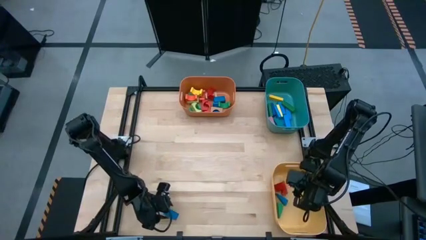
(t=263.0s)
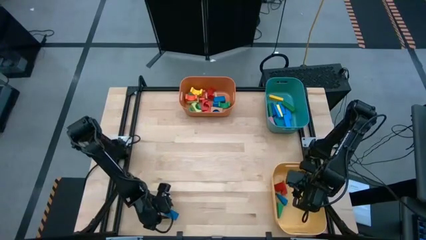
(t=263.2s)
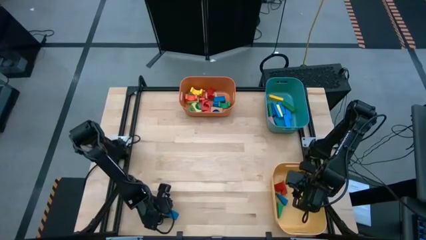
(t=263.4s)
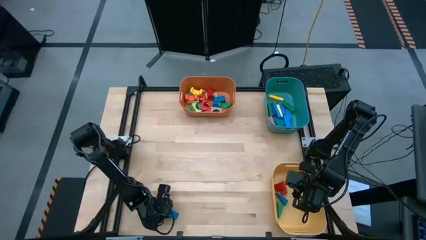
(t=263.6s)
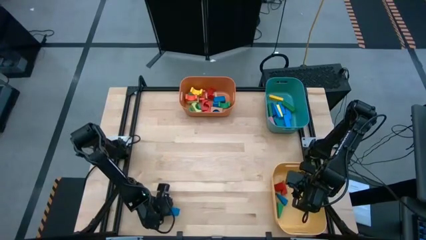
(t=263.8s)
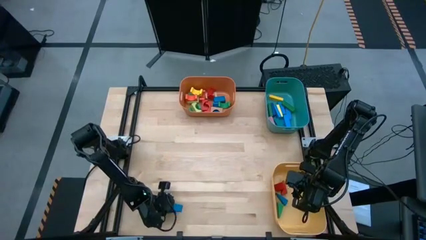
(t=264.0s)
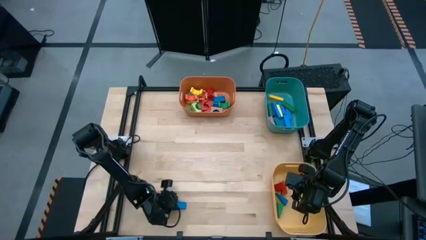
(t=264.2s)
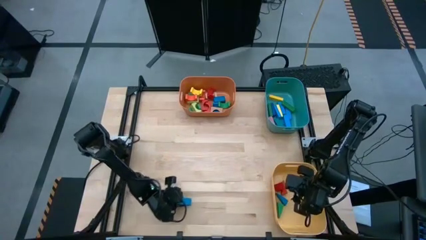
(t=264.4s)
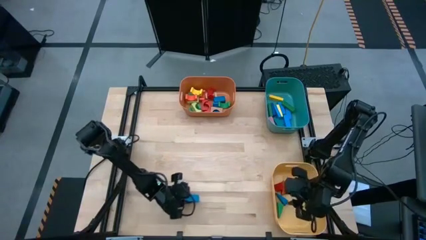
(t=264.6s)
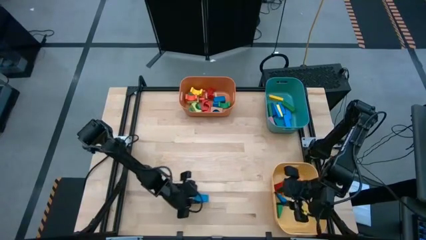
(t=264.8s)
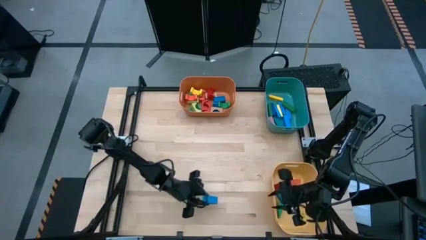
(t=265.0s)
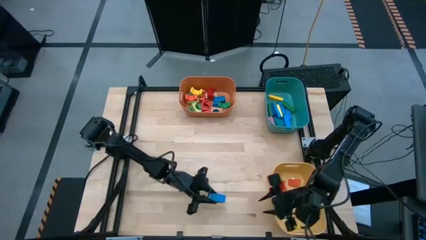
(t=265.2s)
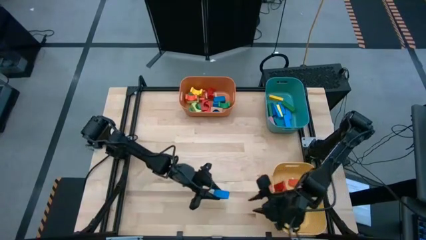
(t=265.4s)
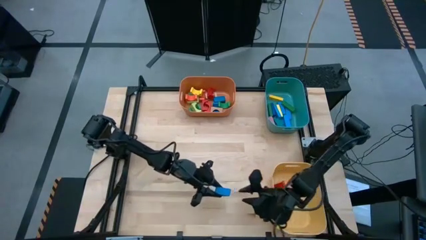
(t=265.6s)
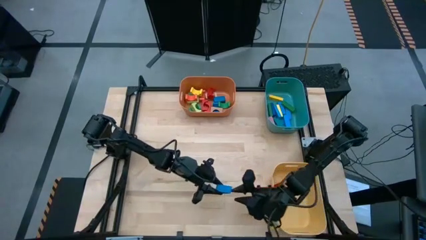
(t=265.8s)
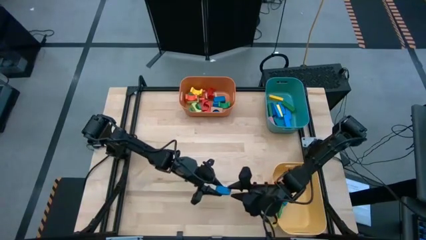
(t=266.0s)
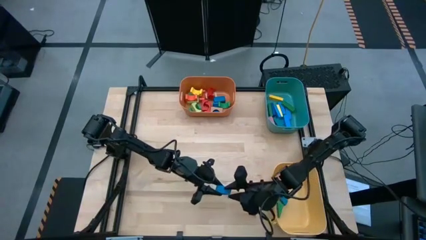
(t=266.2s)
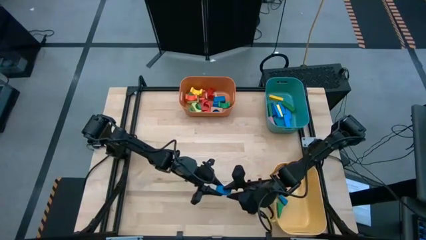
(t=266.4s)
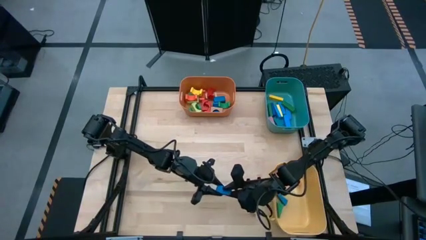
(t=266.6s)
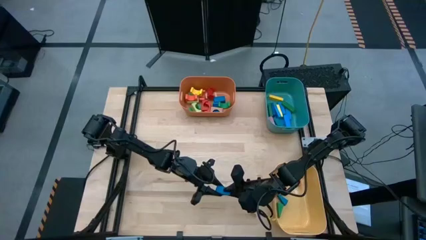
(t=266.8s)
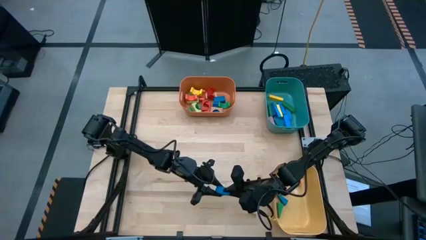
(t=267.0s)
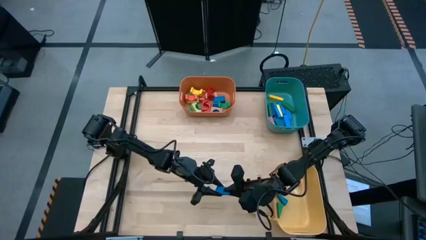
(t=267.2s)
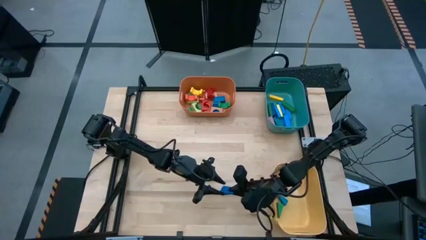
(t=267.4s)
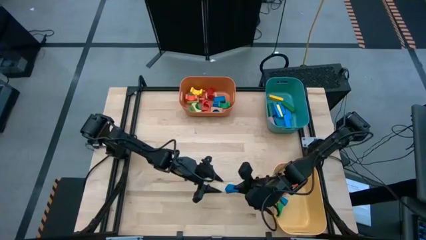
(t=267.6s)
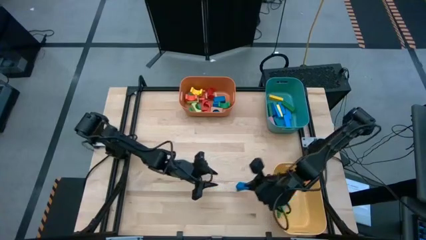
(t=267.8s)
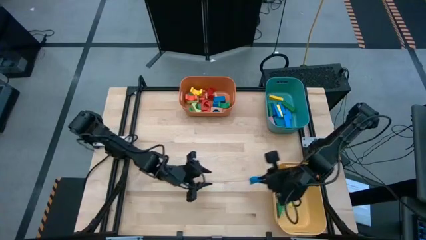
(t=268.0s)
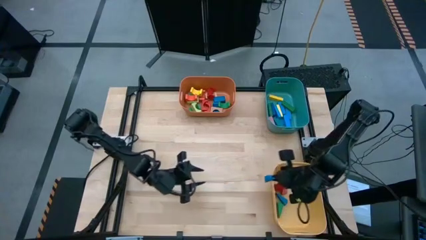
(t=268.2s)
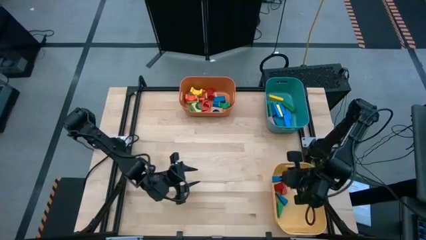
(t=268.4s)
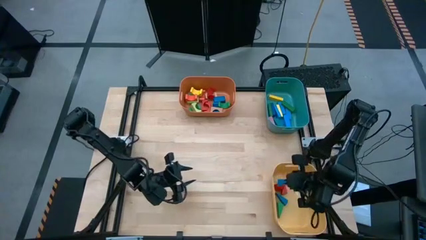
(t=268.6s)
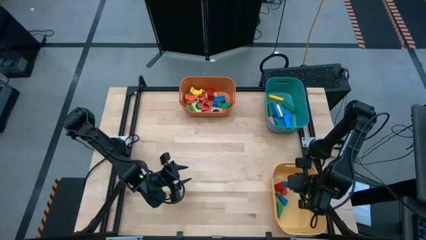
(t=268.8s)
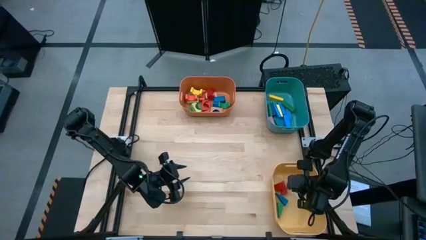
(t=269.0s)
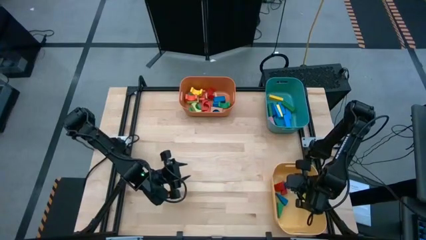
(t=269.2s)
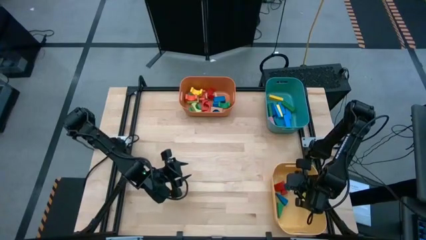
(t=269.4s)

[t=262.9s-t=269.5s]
Task: Sort blocks by size
Put the blue triangular block into the yellow bin

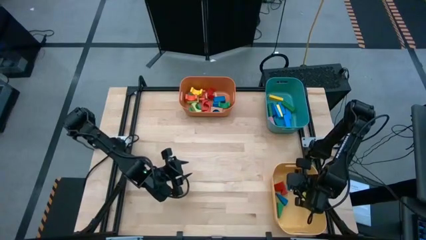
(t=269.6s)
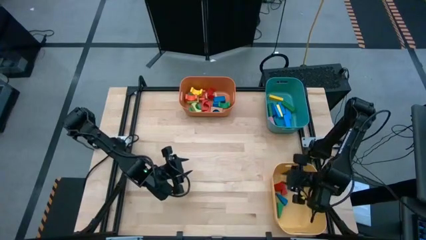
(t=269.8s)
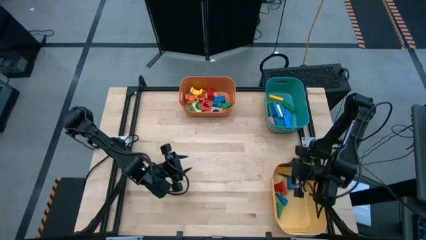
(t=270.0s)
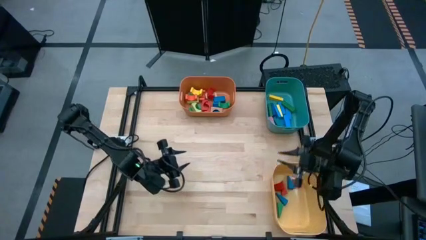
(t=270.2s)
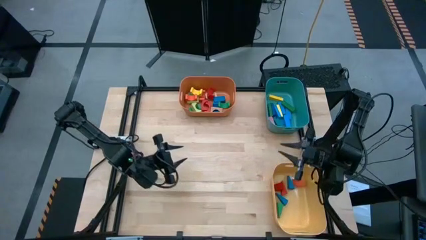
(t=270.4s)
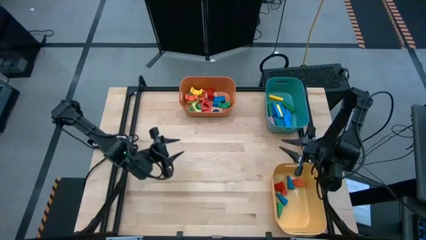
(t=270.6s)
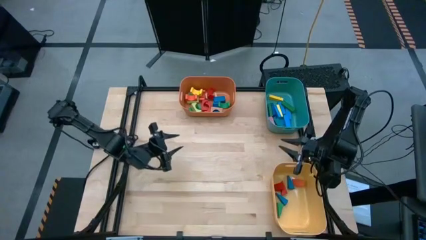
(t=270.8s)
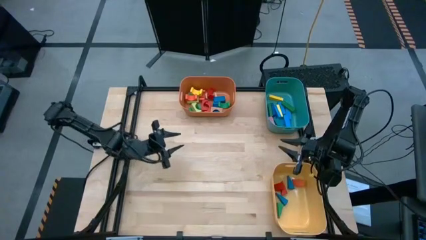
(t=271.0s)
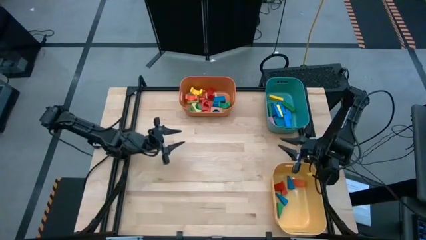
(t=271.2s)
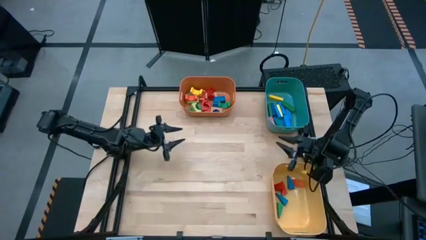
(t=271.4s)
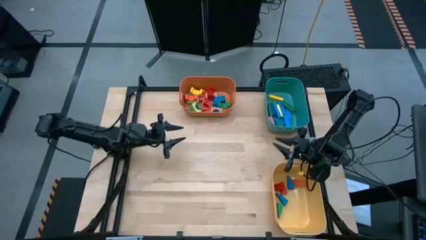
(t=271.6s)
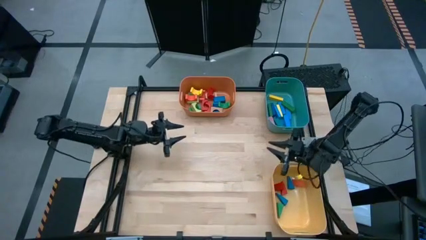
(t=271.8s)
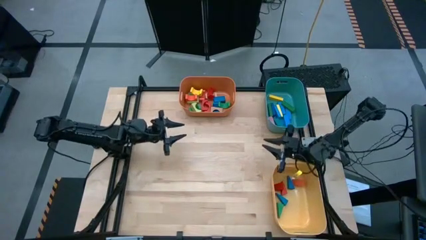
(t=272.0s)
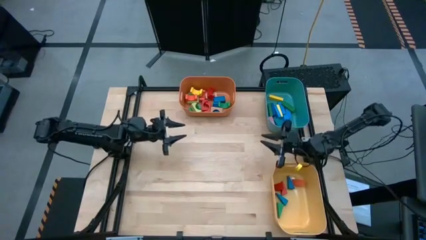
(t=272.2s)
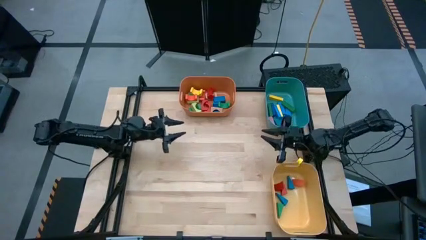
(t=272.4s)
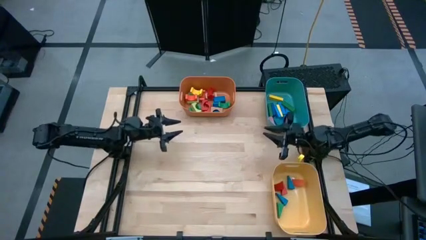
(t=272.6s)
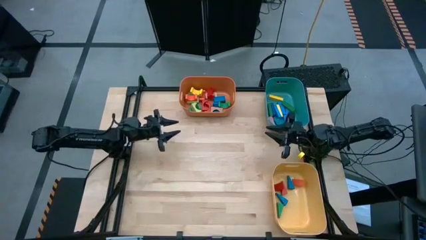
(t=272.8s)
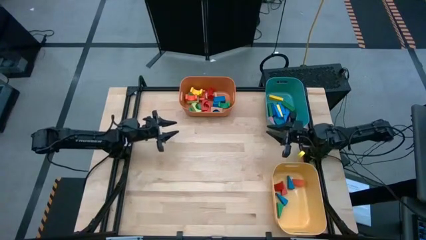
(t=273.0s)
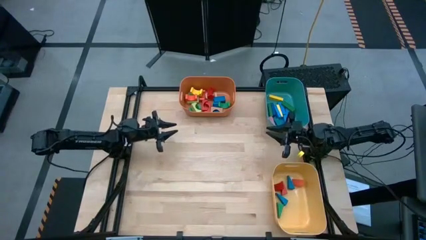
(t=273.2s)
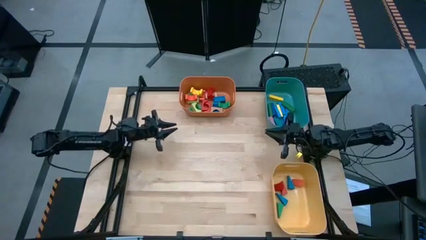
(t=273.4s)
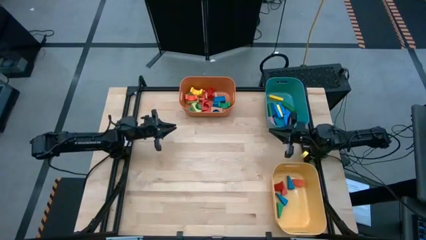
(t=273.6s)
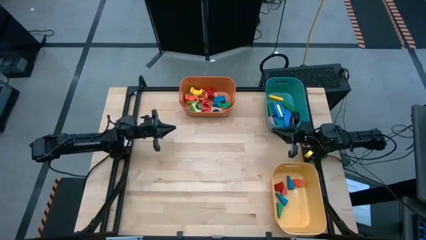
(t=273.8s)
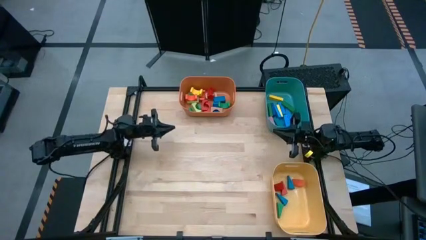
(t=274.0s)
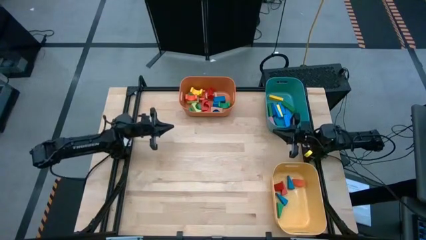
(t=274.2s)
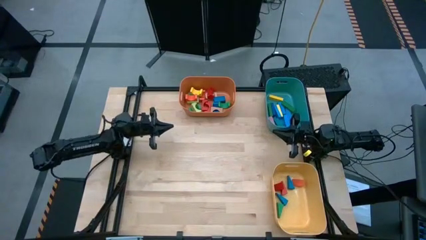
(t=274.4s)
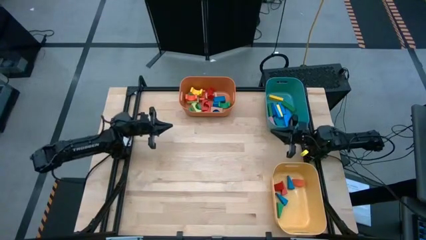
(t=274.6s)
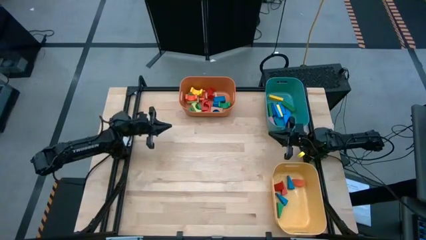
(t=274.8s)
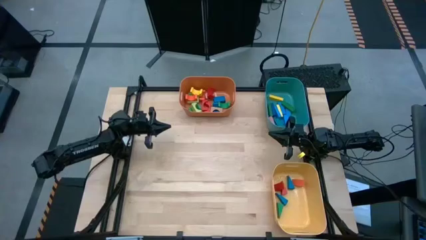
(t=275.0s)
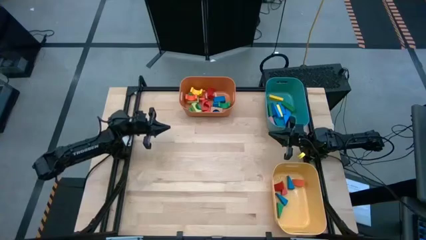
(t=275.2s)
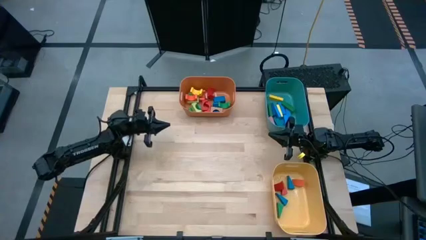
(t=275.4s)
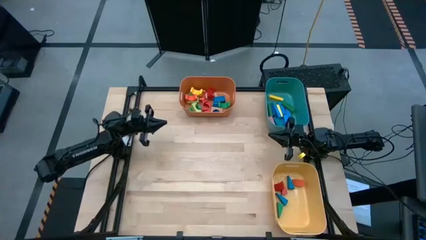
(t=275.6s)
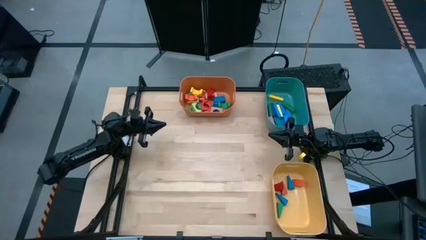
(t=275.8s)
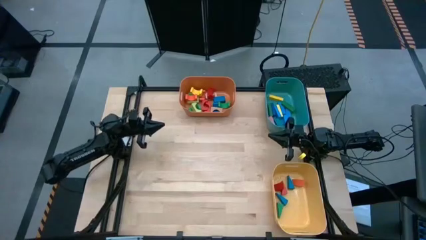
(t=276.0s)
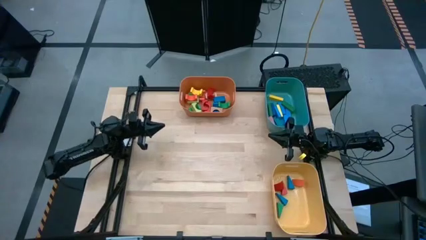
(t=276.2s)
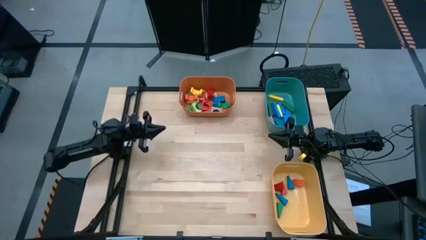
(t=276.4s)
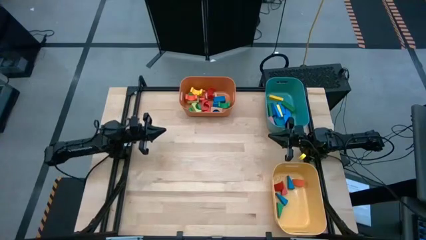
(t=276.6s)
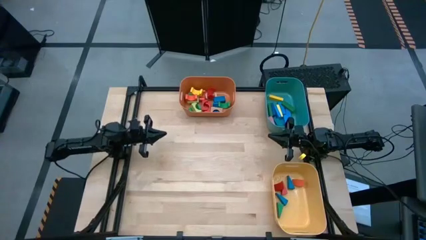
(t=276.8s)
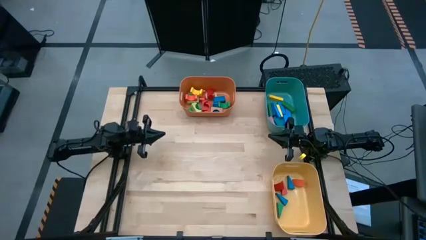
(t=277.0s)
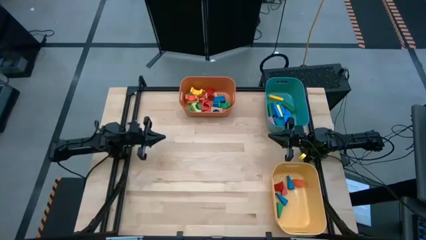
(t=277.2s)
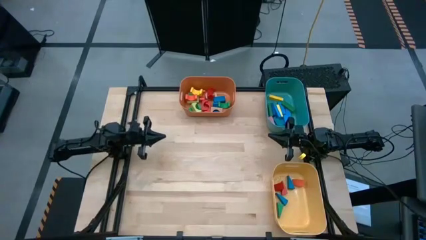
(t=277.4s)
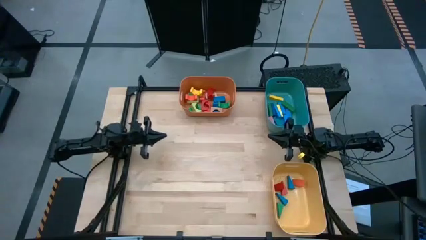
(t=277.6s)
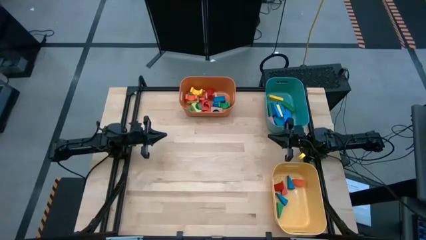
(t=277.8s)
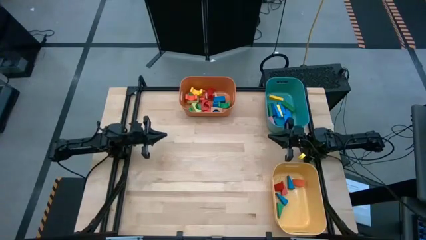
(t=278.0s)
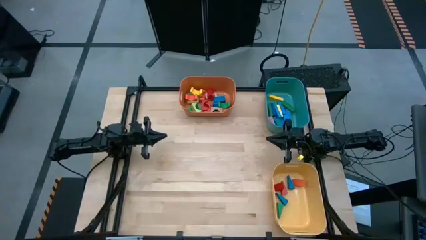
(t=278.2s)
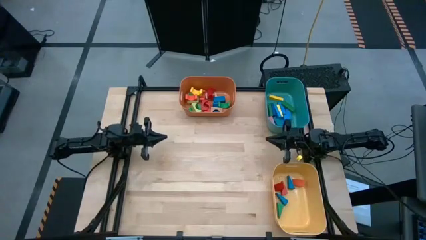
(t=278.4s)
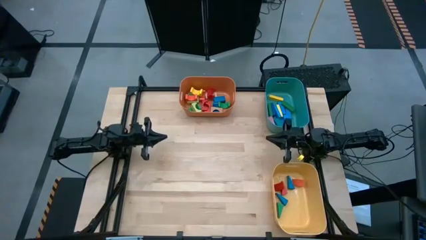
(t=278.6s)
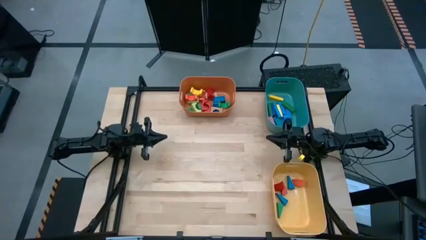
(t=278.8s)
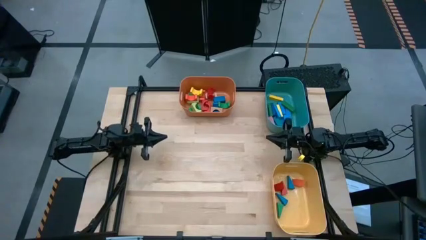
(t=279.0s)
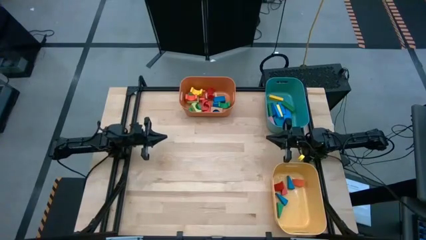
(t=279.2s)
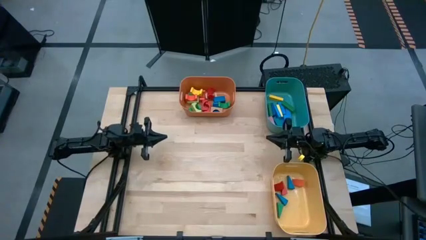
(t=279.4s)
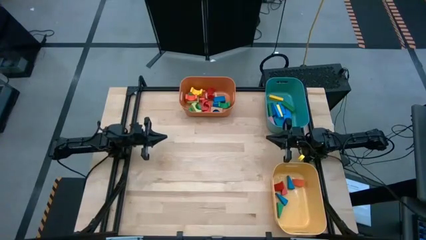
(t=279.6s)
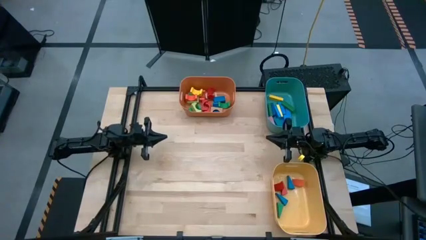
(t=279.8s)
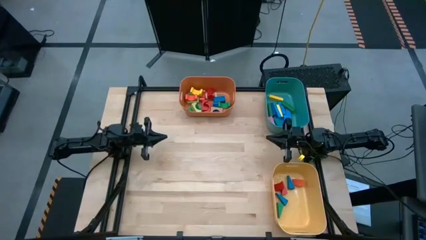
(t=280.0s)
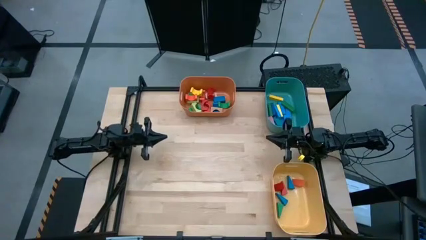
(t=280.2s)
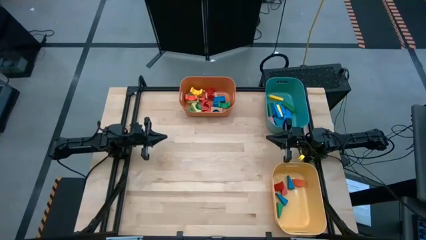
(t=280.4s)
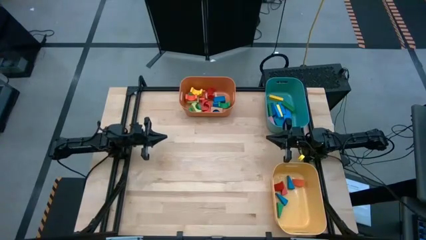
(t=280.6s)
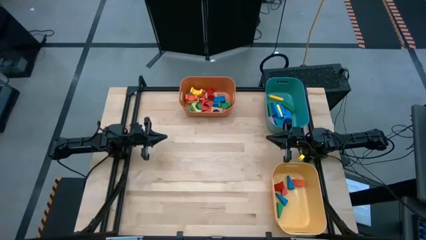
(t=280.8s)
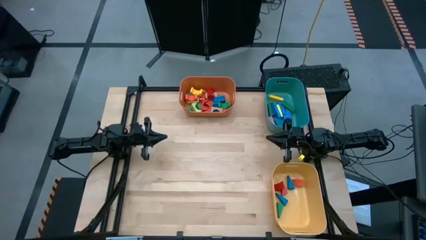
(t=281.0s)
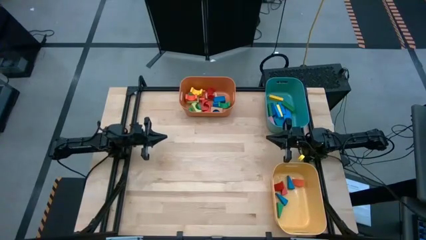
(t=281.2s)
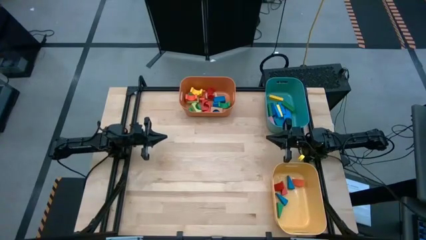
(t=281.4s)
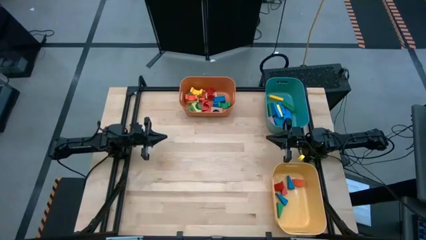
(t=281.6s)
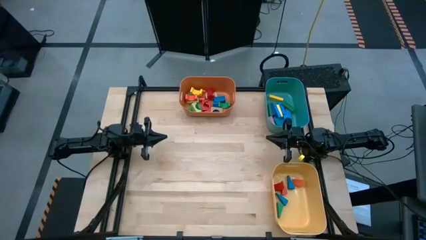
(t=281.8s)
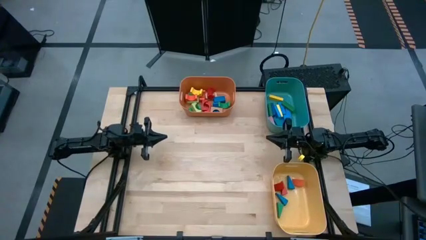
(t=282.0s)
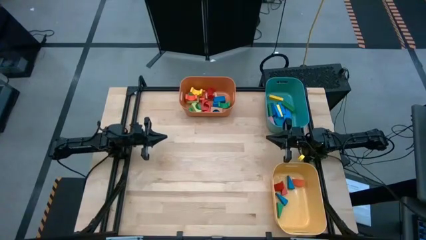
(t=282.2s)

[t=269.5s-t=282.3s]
Return to Home Position
